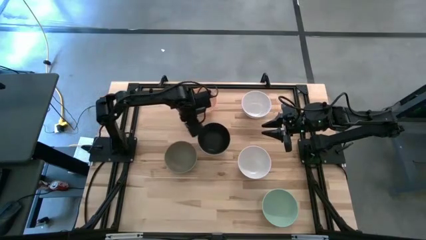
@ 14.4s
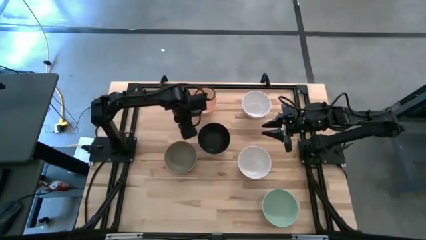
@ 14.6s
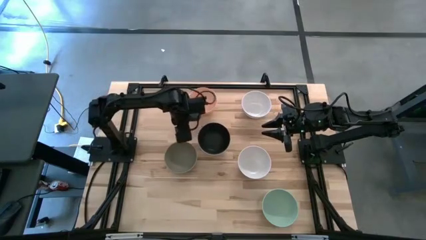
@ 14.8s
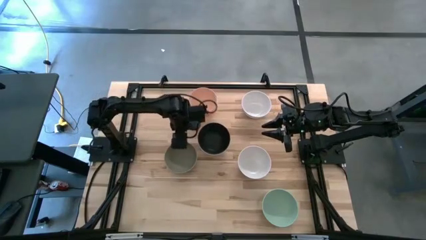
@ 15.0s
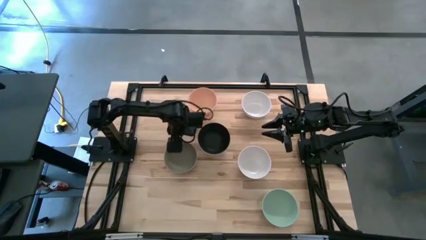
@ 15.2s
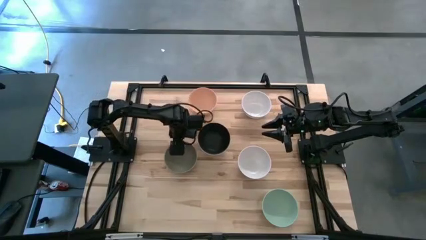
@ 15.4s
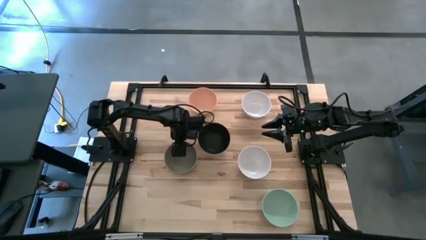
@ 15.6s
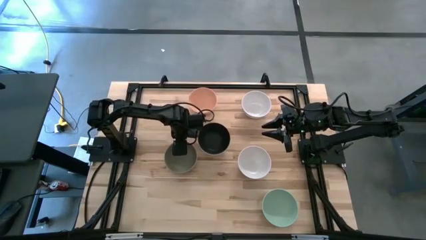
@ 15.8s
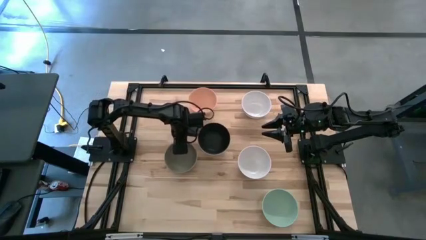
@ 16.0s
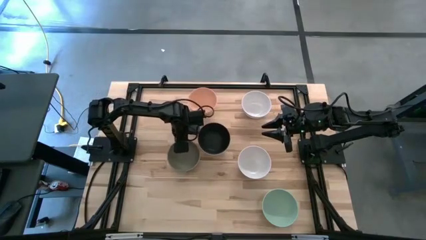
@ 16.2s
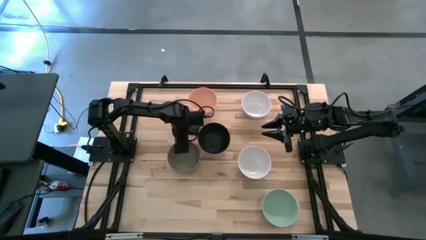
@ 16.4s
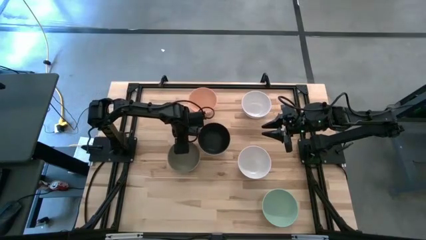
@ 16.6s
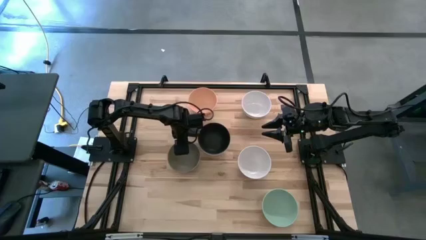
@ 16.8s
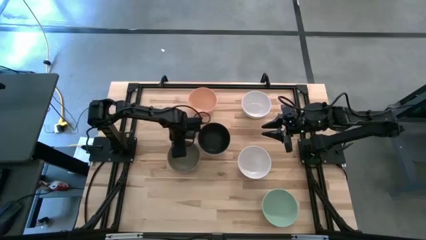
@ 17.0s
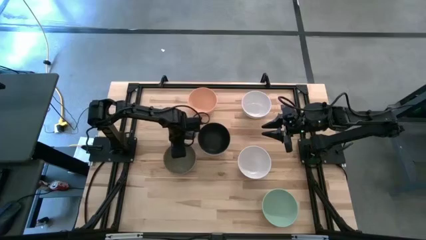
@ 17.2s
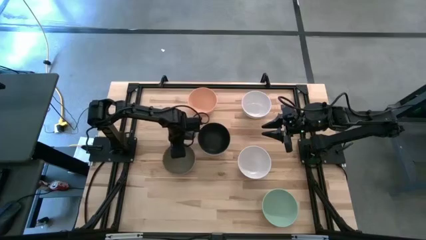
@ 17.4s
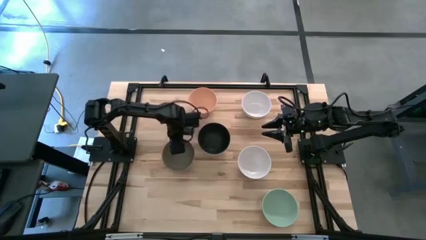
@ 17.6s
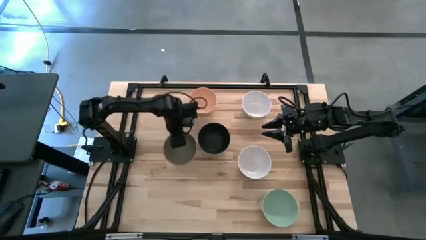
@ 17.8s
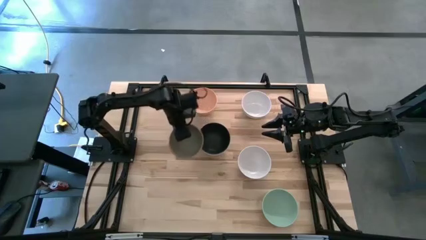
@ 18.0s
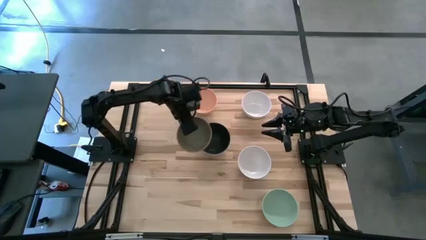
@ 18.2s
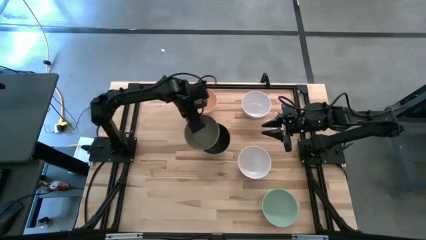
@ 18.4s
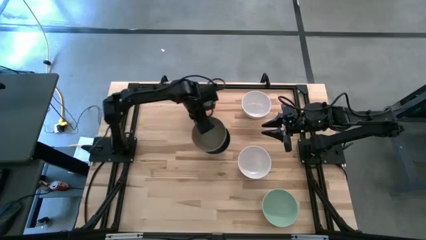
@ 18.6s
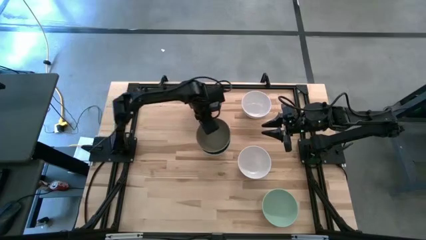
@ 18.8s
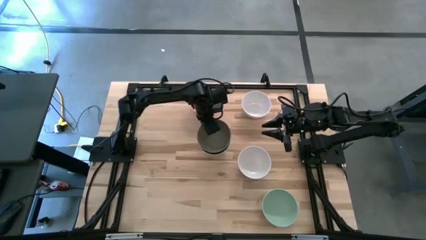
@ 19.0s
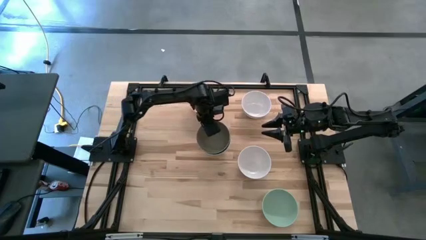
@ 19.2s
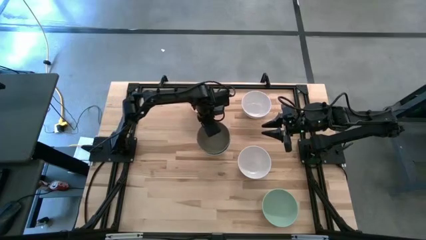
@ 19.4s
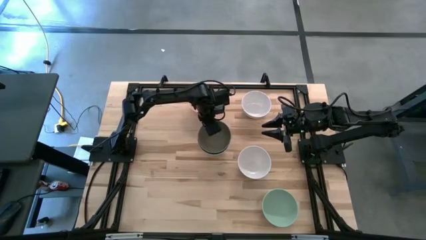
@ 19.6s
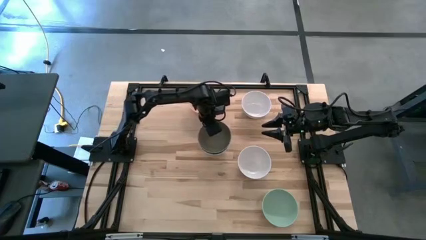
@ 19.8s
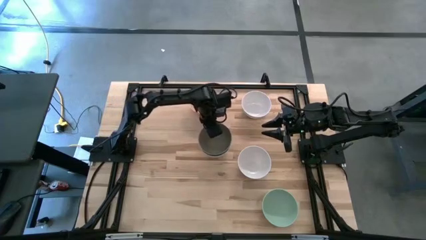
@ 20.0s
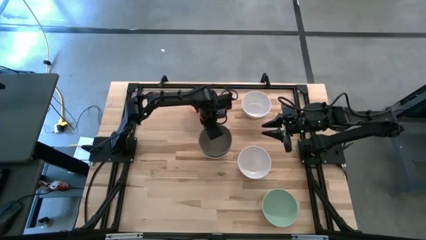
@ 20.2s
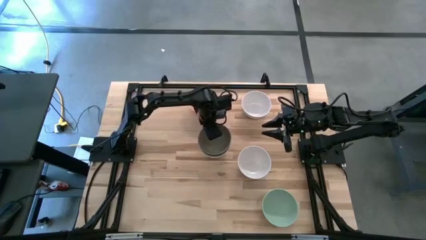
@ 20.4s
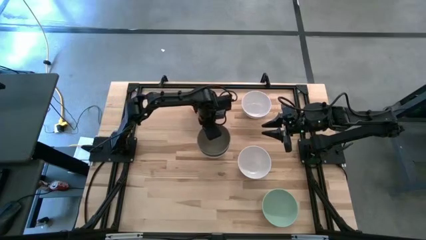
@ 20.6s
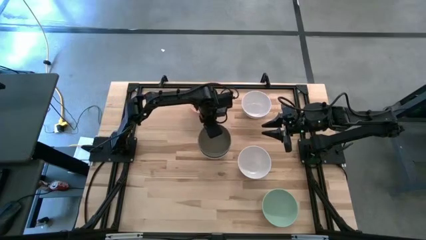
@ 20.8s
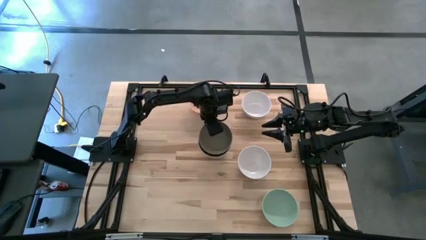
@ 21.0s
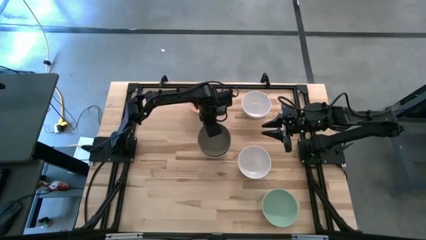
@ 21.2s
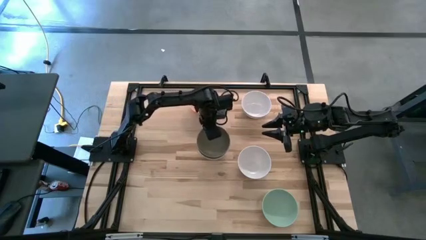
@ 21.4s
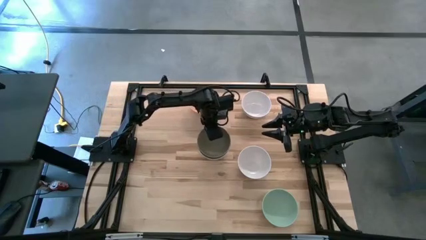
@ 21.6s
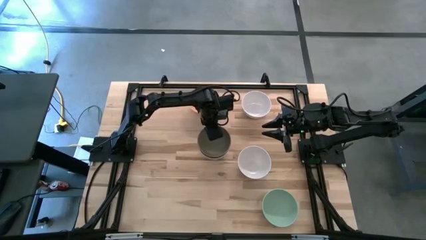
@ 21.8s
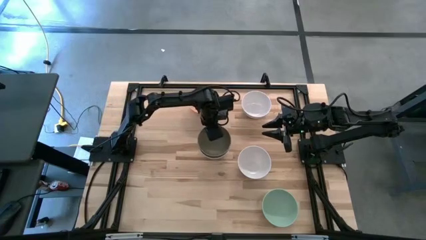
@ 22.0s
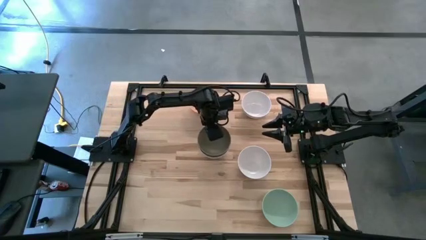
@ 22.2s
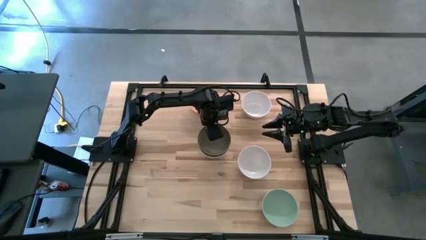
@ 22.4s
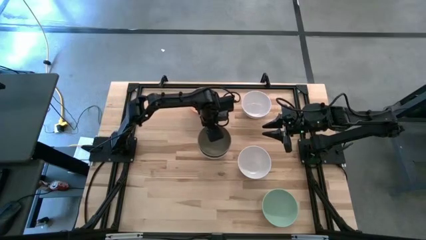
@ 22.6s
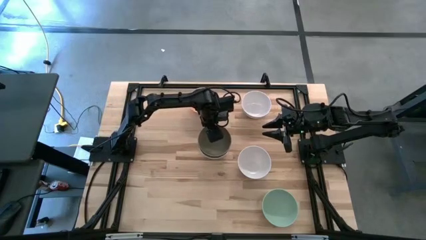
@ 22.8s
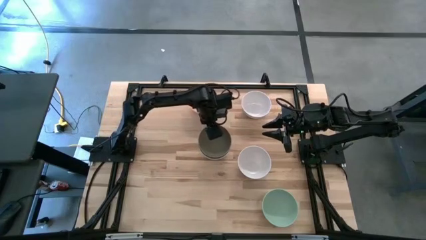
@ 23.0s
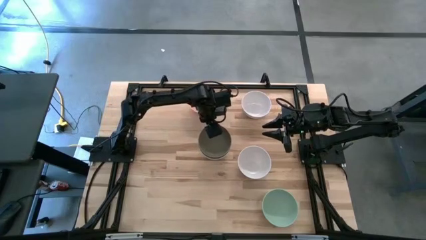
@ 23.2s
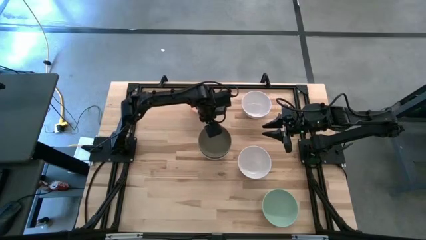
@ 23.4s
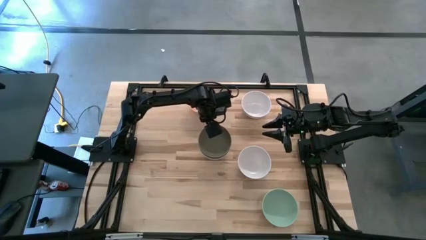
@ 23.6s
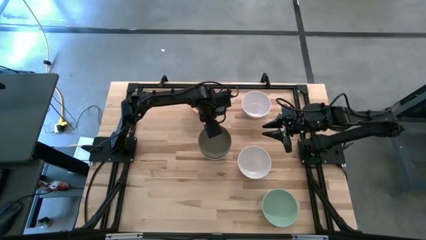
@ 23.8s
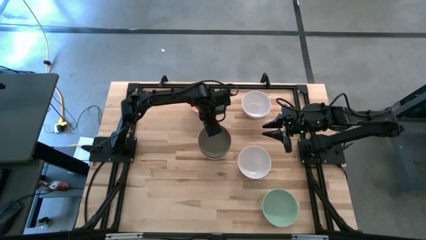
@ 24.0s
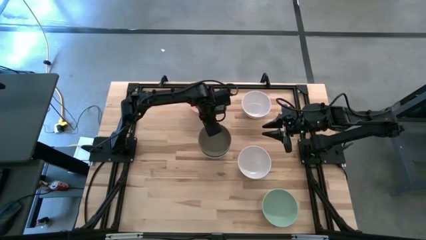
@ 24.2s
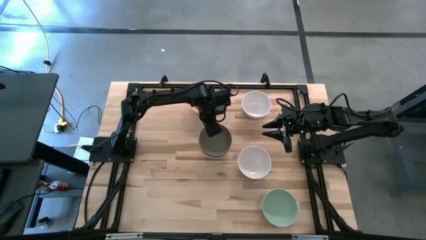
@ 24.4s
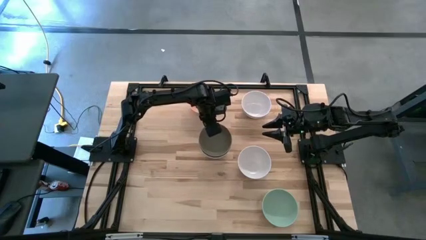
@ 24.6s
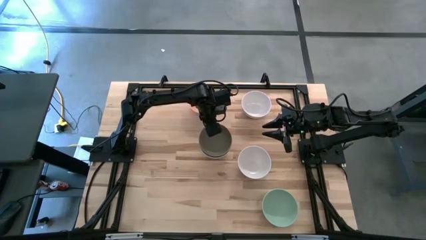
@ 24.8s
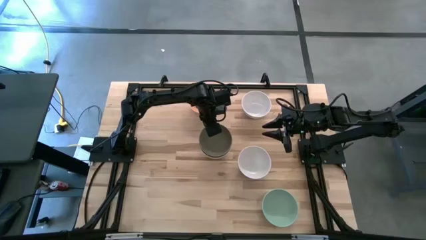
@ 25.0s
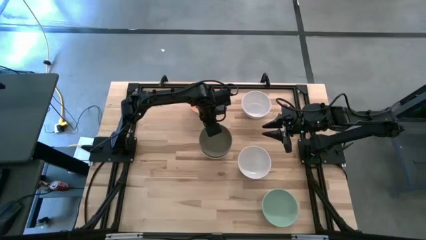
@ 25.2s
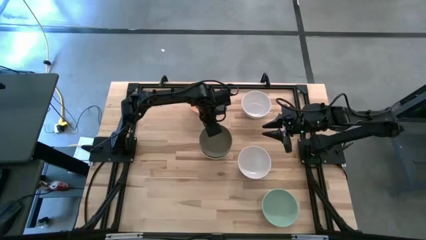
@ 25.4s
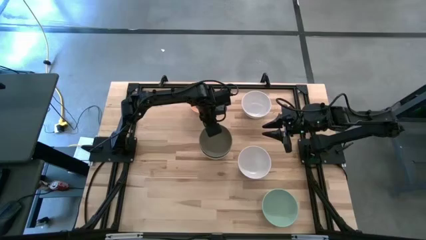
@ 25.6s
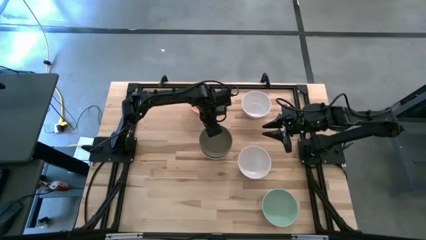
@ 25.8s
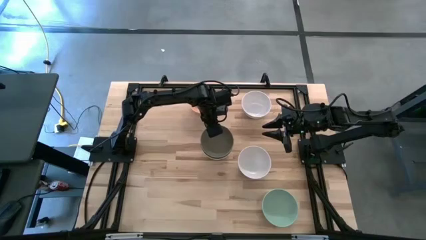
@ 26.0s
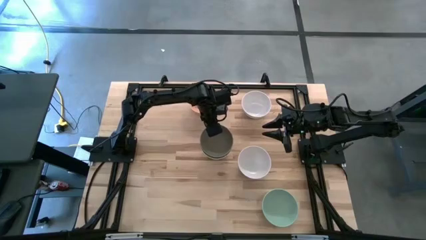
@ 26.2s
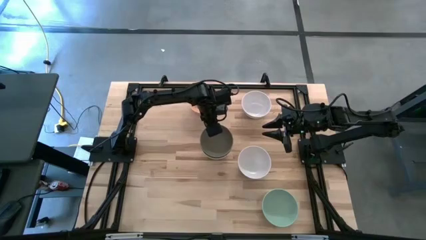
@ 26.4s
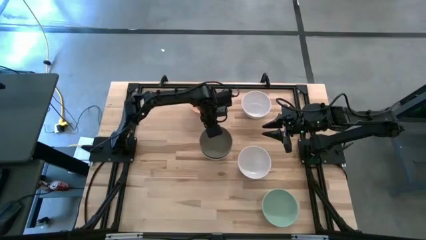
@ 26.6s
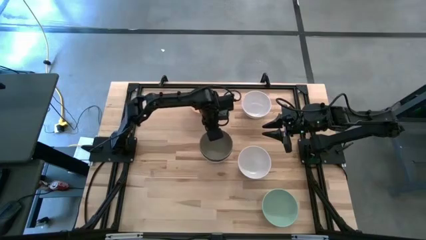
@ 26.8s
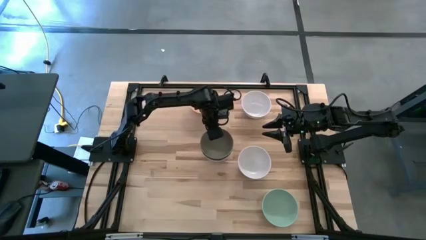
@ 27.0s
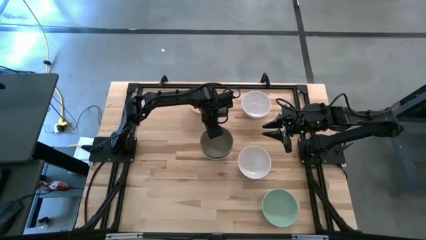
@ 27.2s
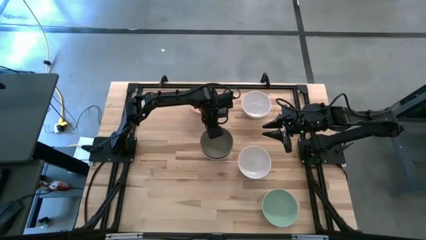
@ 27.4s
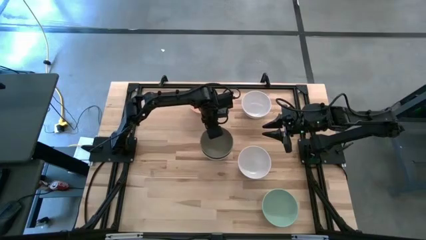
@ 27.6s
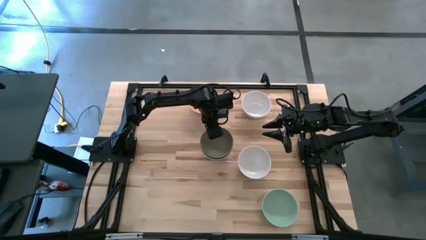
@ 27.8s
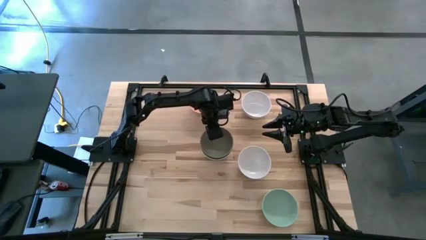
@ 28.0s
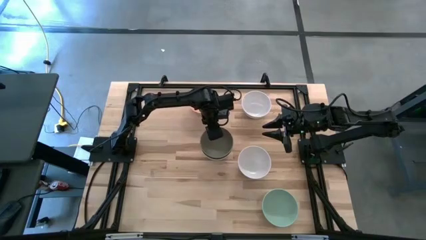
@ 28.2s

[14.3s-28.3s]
Task: Nest bowls inside each other
Stack the gray bowl on the black bowl

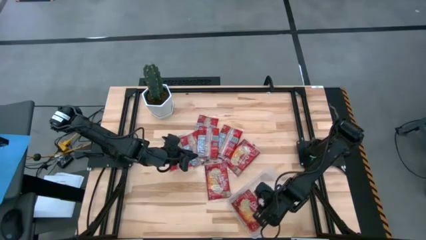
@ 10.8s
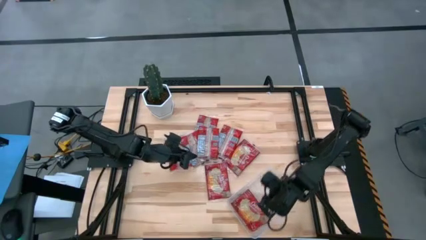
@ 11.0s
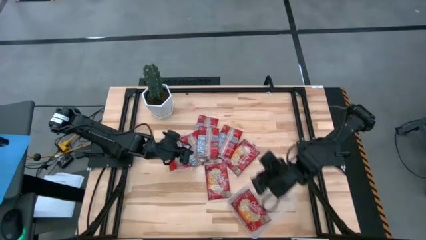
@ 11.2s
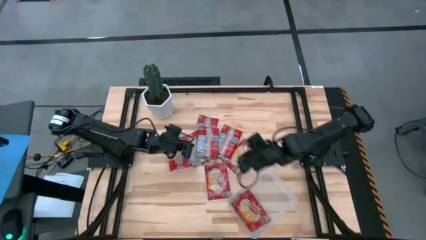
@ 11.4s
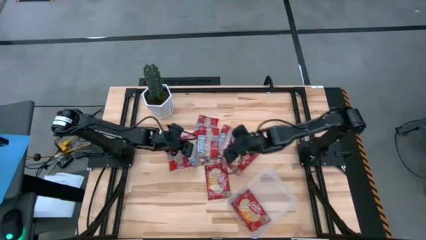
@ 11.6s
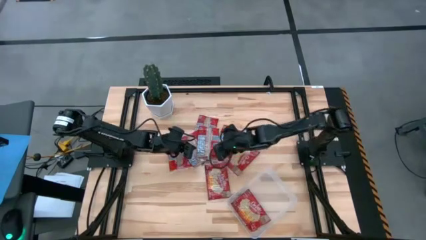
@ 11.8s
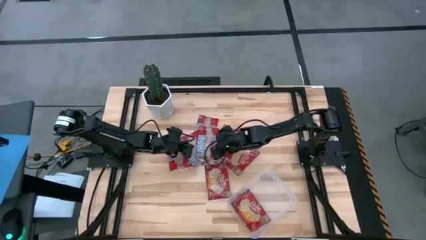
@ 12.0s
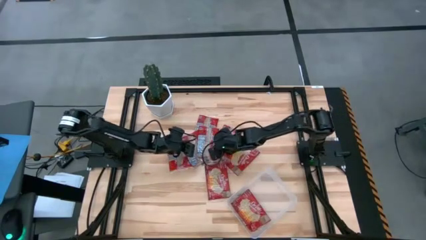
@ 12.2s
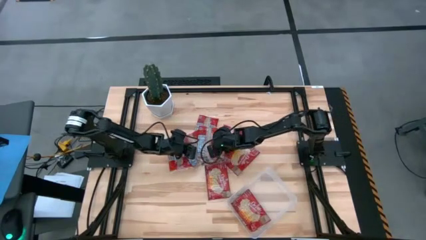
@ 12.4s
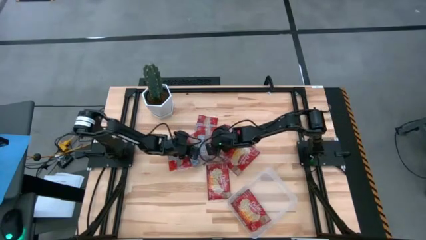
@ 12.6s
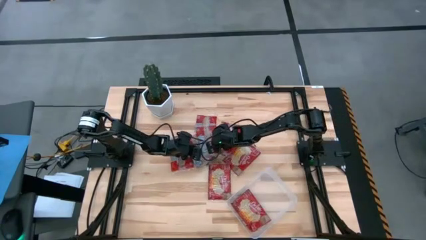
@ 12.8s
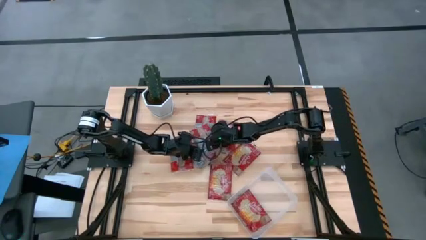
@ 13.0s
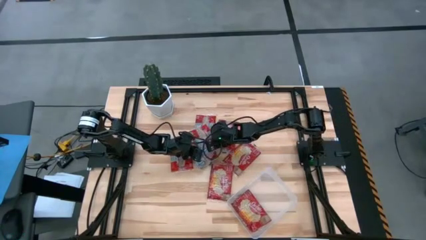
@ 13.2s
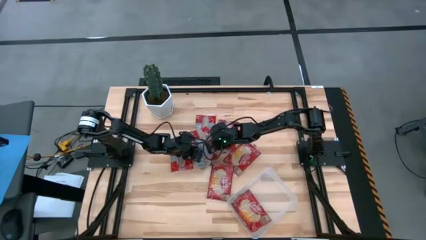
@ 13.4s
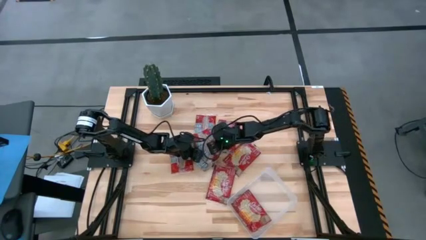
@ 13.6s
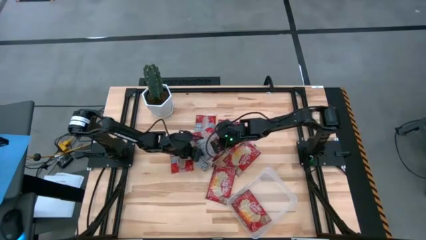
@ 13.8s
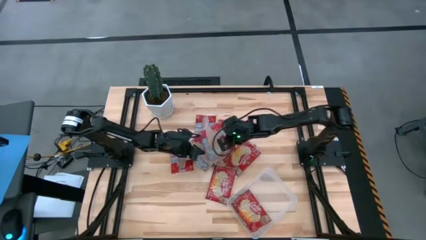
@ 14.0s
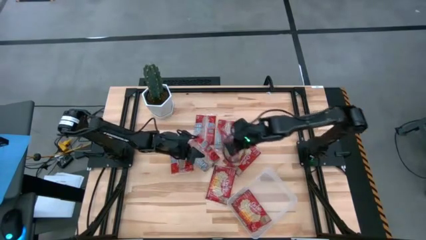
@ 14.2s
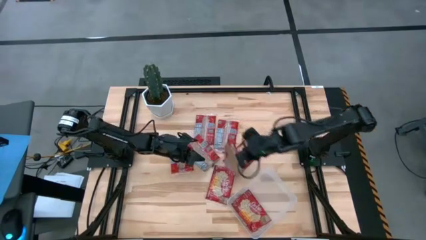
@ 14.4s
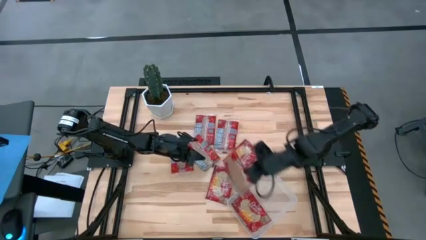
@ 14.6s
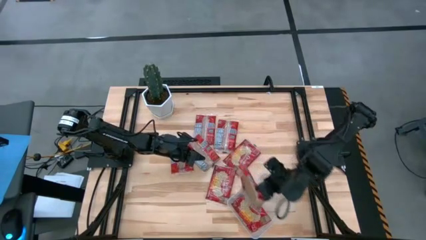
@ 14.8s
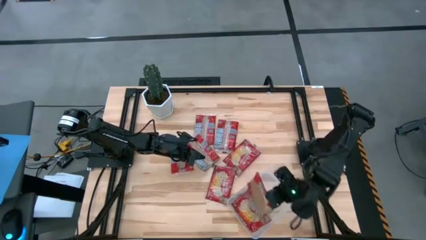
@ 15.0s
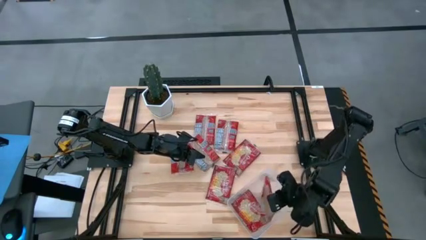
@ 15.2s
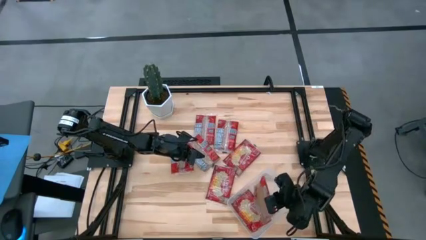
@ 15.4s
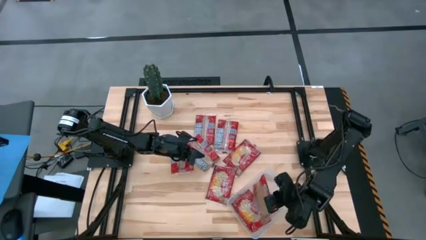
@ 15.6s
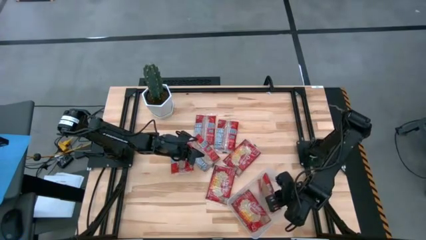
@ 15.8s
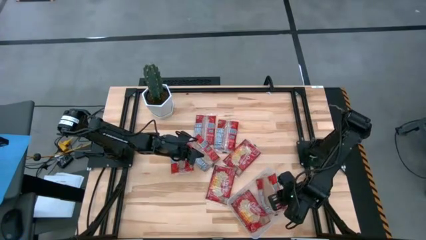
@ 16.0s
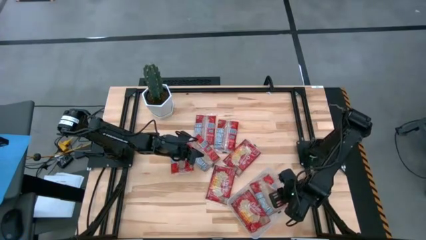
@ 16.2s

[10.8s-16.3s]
Task: Sort popcorn bags into baskets
Put the red popcorn bag into the transparent container
